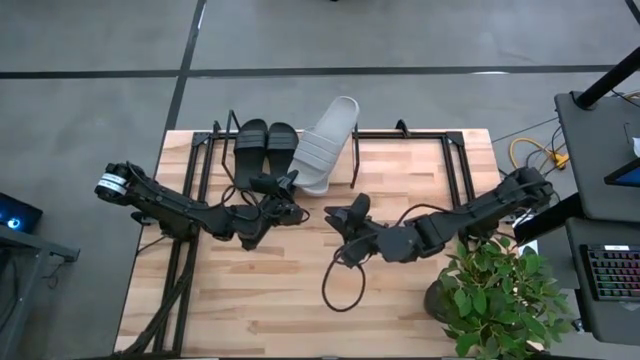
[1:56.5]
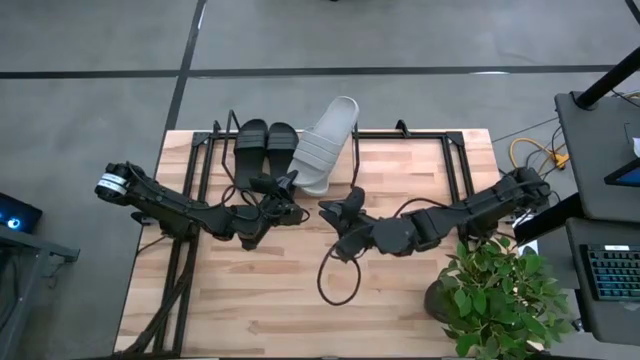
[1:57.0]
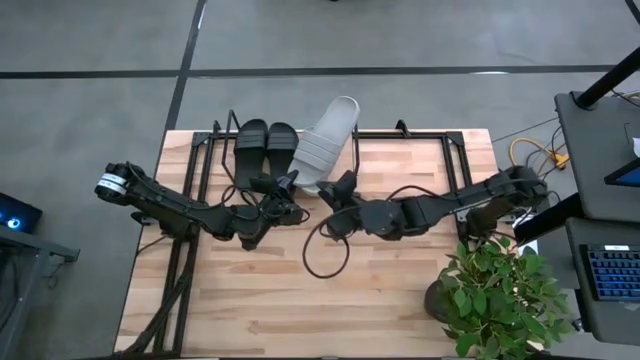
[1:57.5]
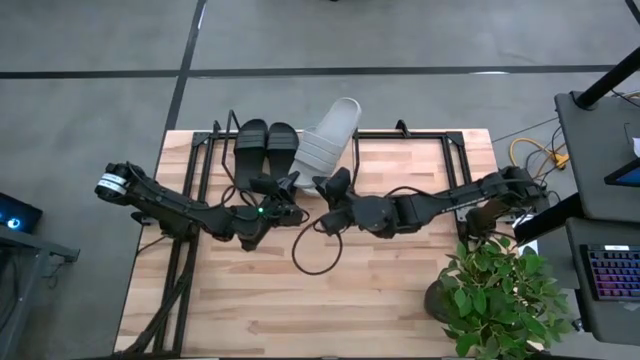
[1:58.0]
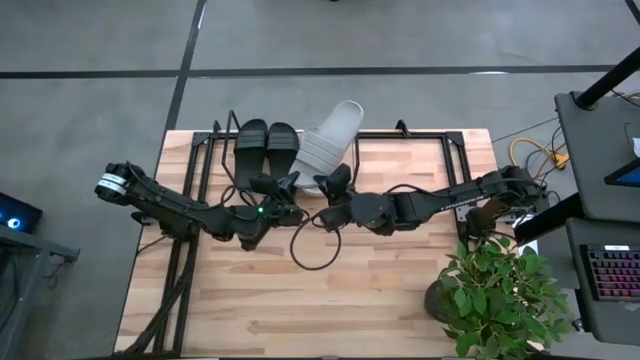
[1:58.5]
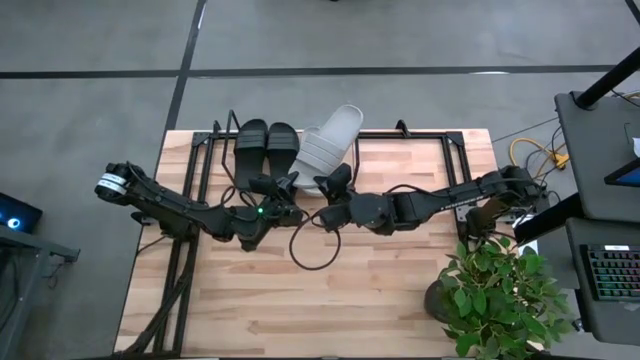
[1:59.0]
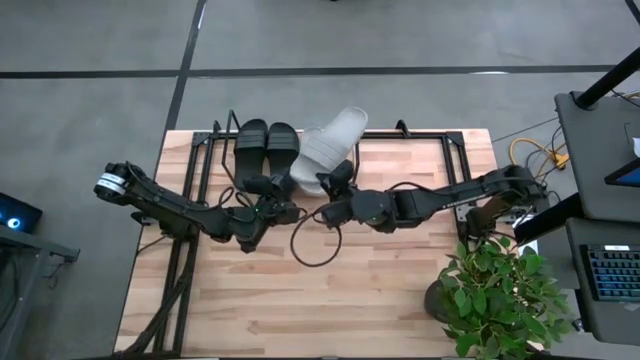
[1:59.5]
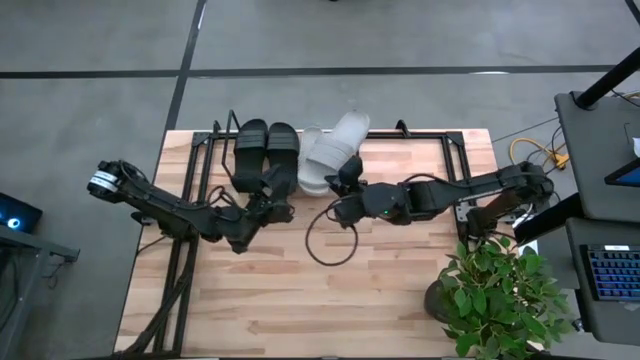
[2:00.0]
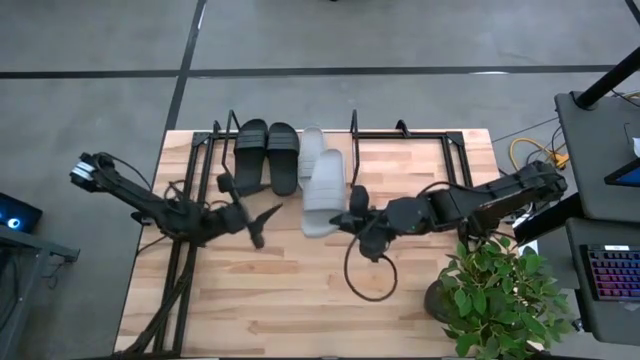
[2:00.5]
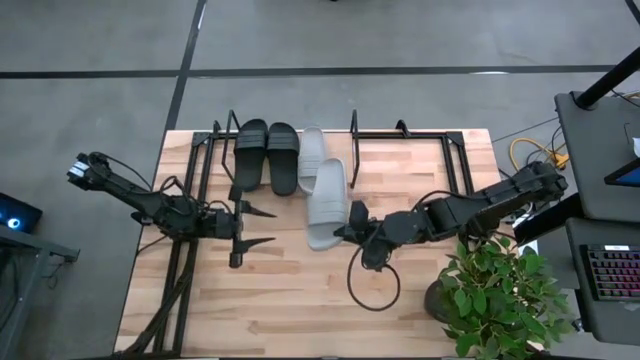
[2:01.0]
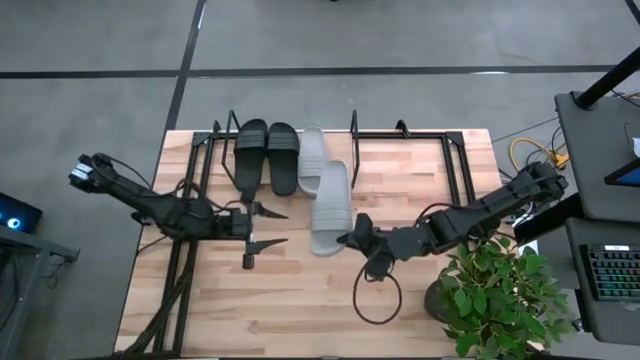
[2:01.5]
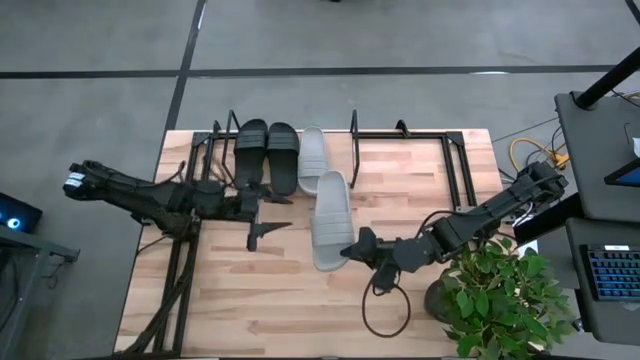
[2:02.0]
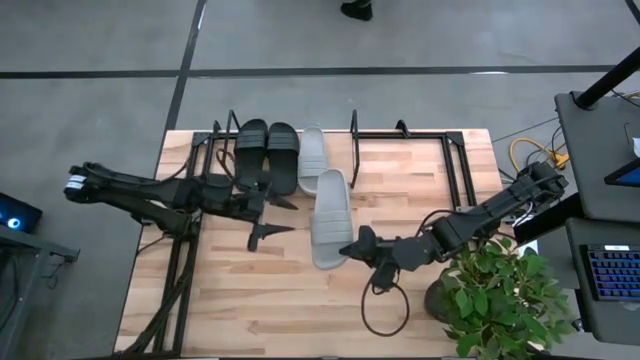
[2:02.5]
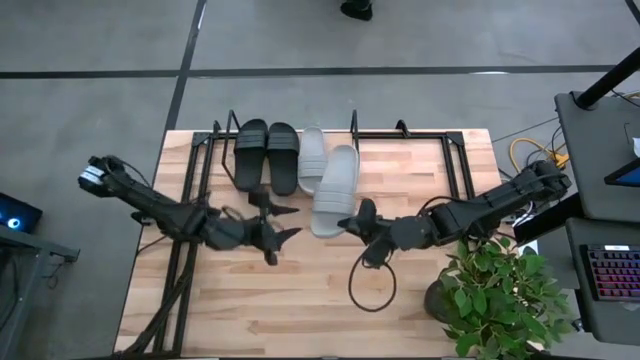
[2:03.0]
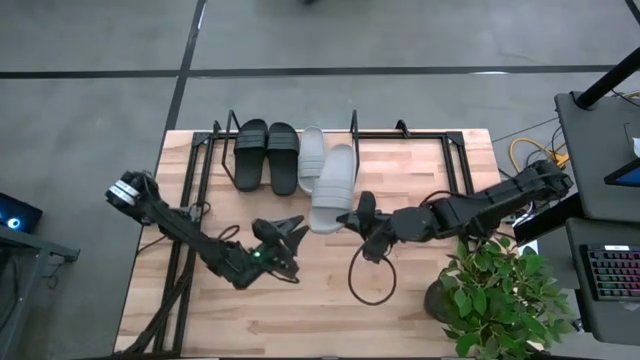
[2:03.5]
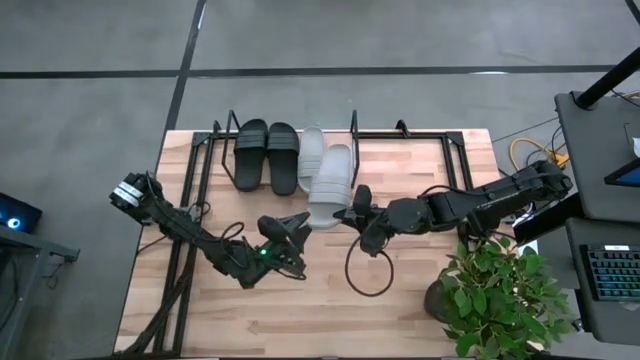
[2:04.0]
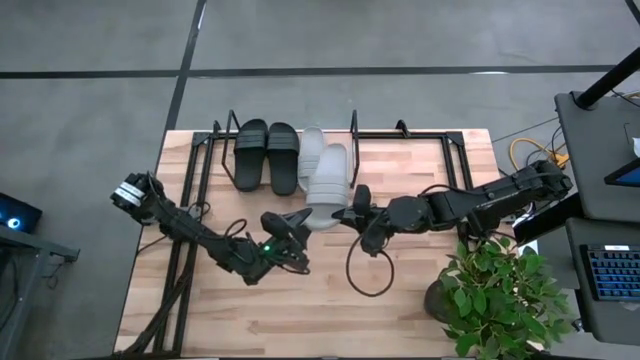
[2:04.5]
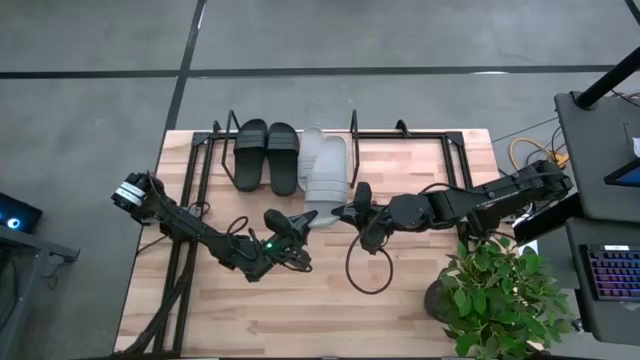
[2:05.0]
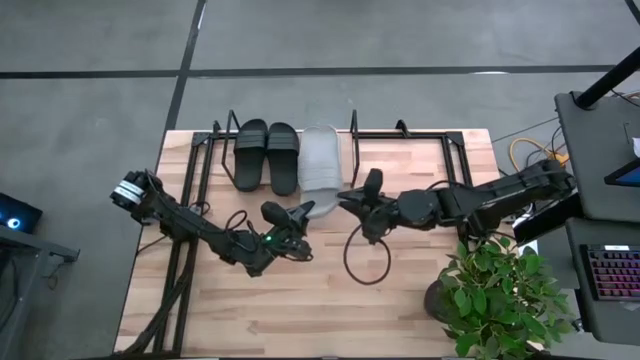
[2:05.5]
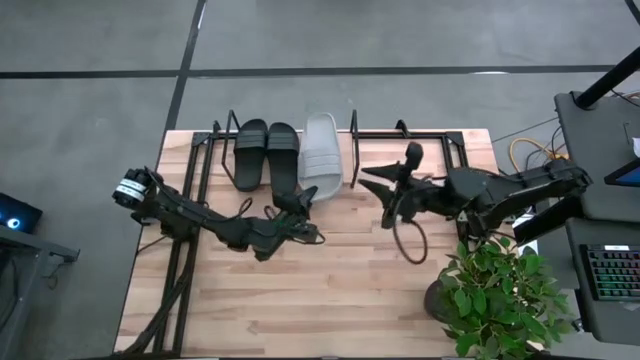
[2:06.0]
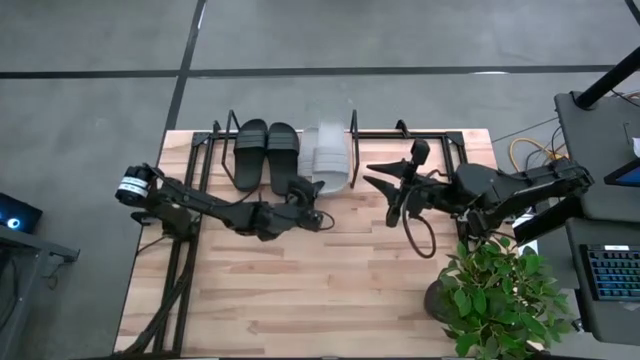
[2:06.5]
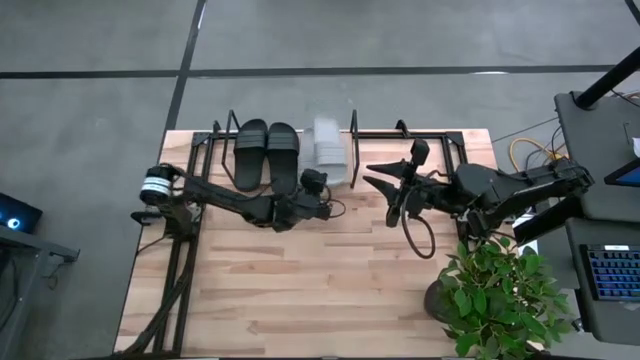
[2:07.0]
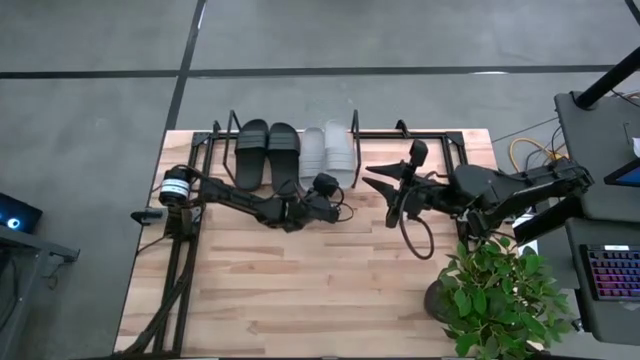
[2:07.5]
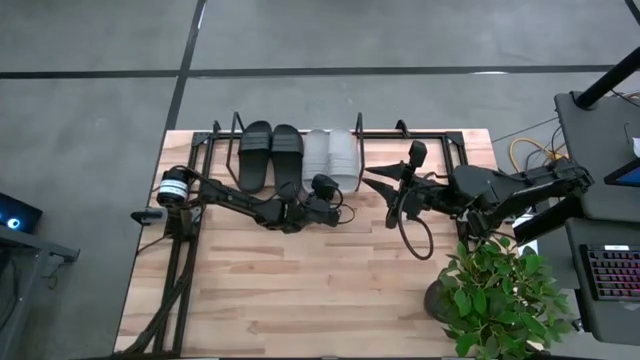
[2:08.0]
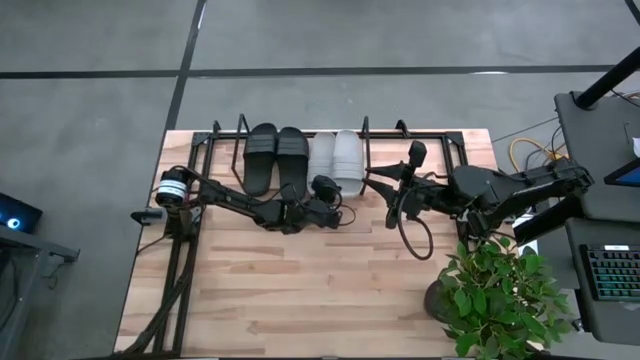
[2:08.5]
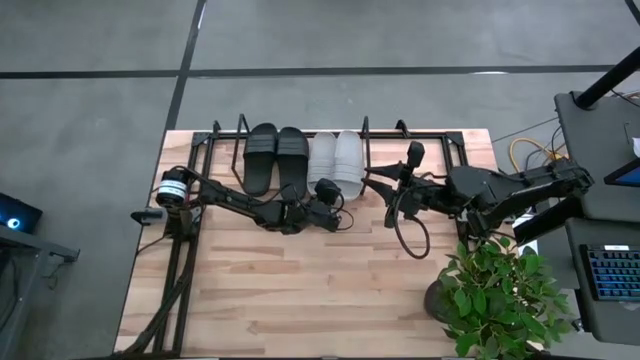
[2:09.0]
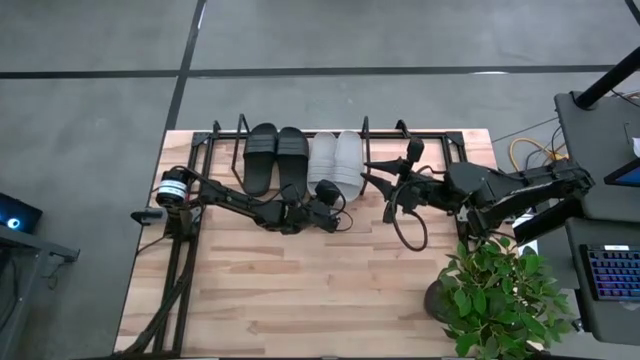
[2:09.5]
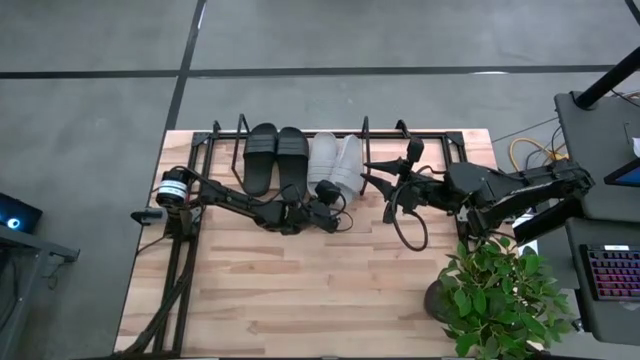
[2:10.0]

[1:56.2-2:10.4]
Task: Pick and place slides into the shelf
Put the gray slide on the shelf

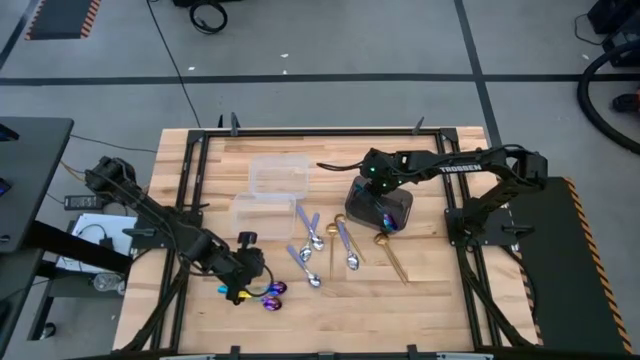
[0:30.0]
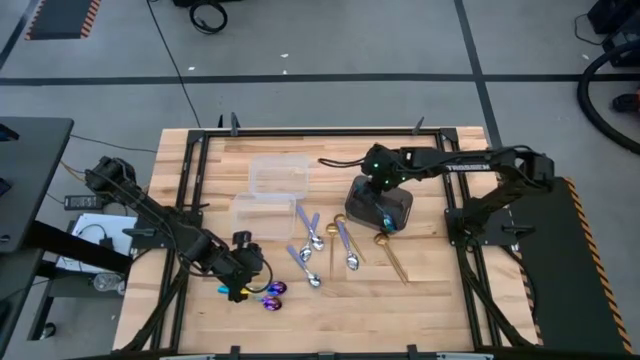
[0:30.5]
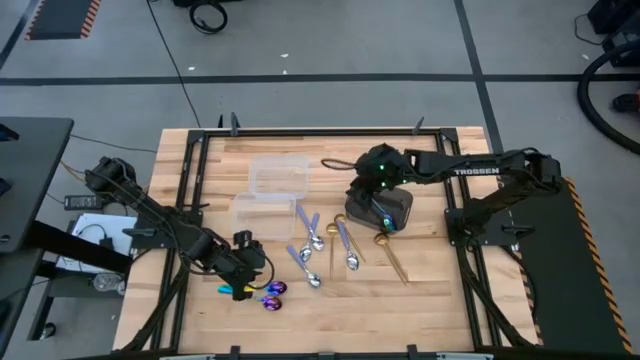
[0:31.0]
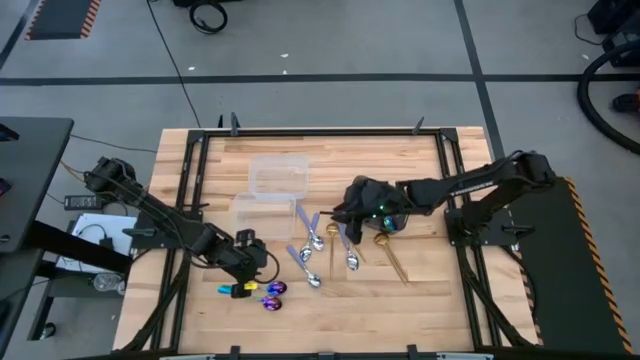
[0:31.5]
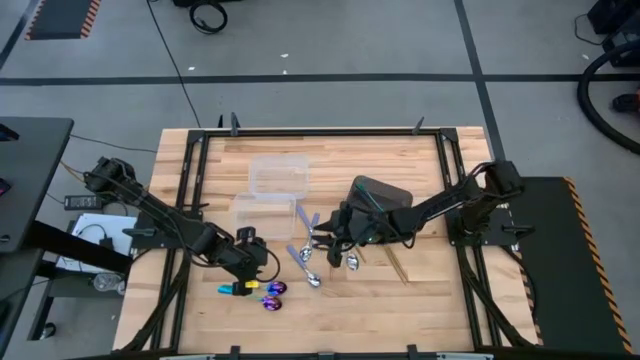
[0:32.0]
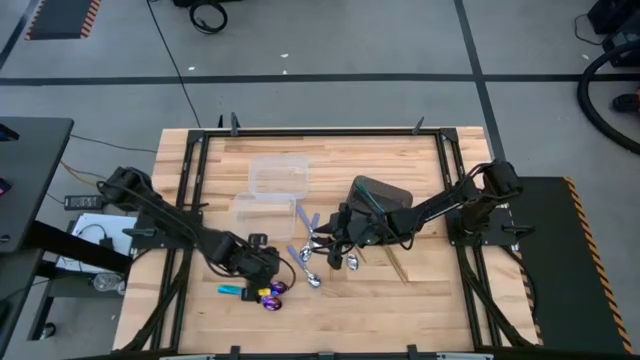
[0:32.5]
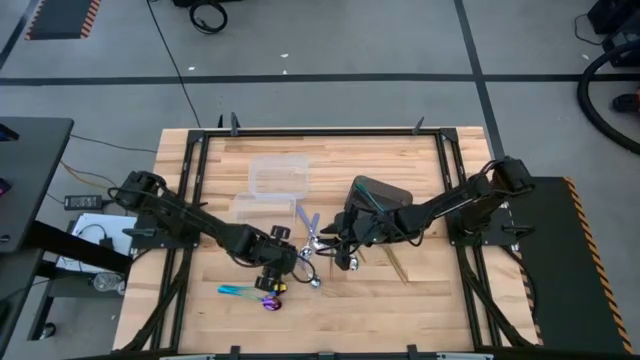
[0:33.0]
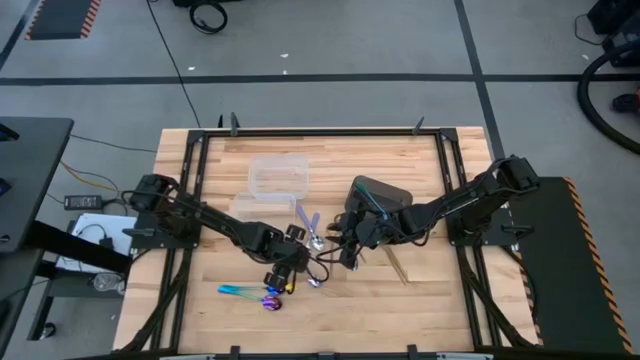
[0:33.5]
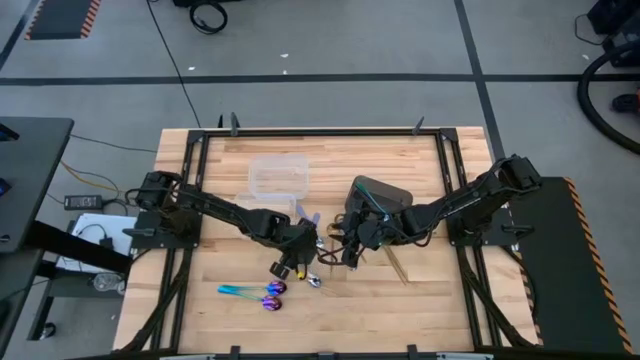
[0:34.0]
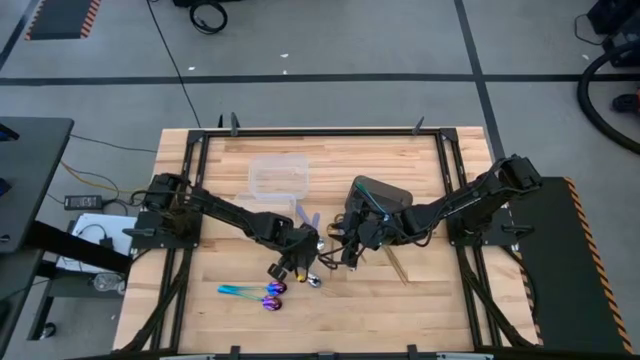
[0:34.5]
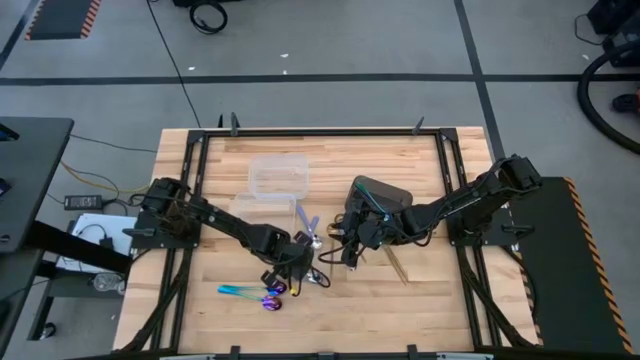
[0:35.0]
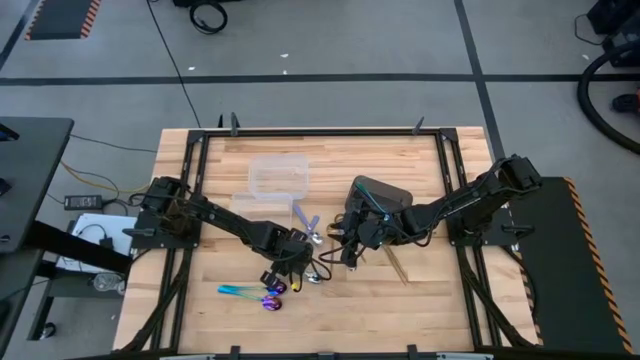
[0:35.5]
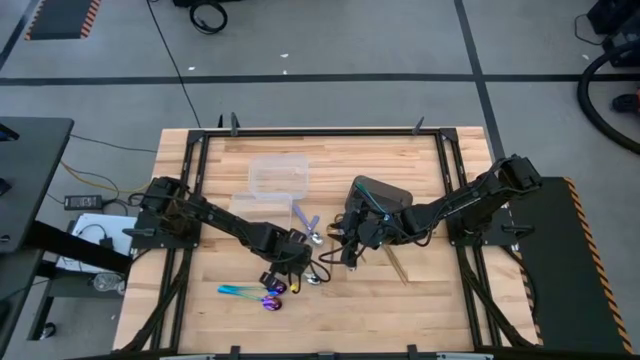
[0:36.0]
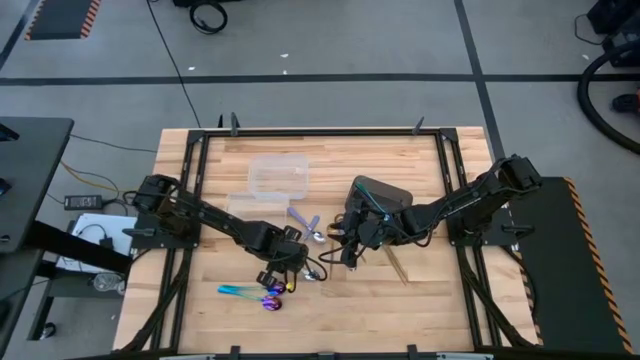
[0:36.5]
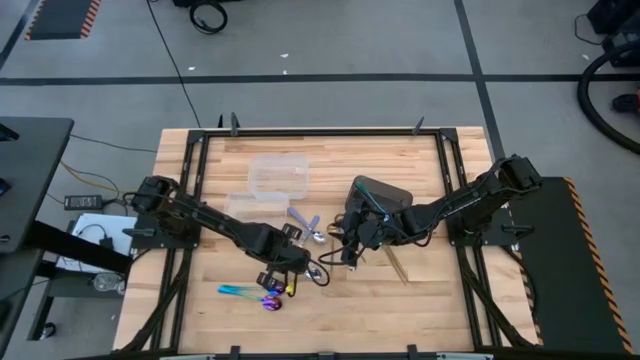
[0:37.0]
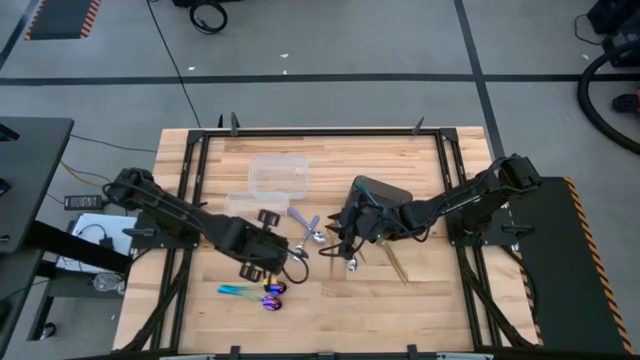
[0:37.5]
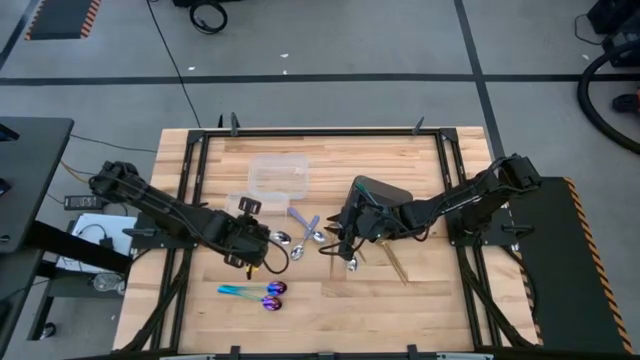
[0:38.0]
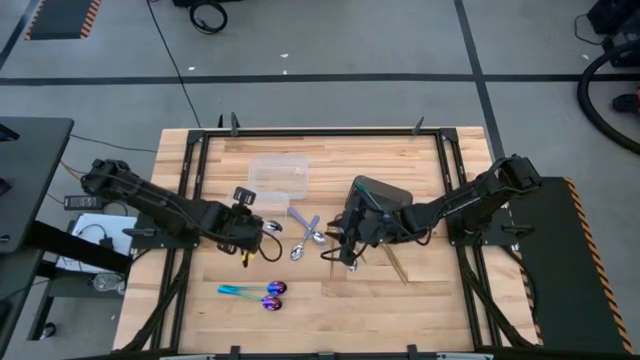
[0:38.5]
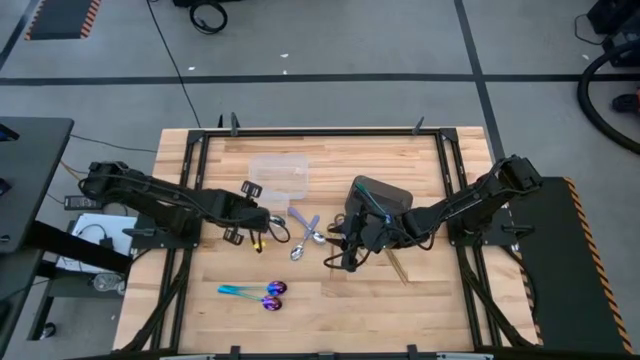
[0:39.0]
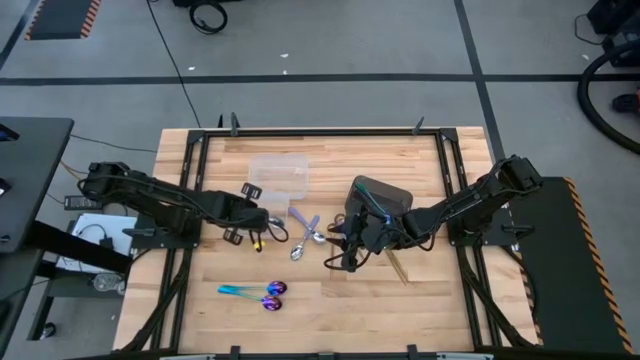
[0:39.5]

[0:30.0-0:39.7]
Task: Sort silverware by color (type)
Put the blue spoon into the bottom transparent bin
